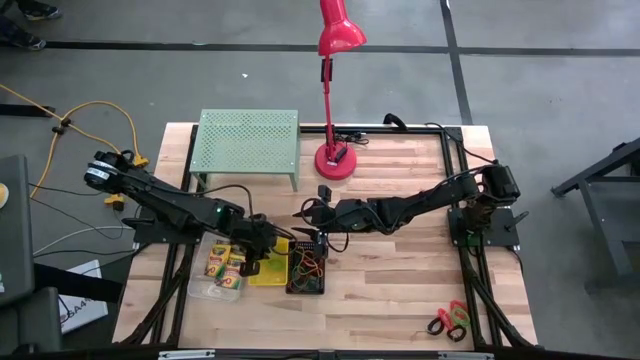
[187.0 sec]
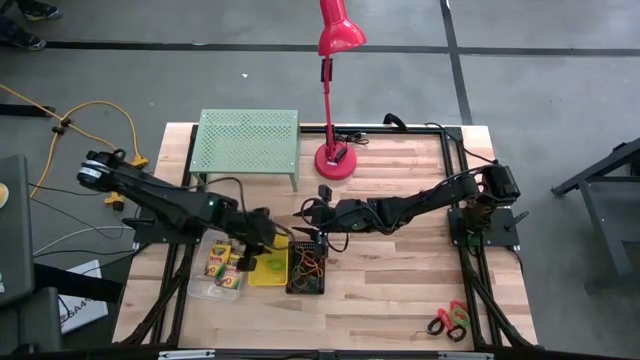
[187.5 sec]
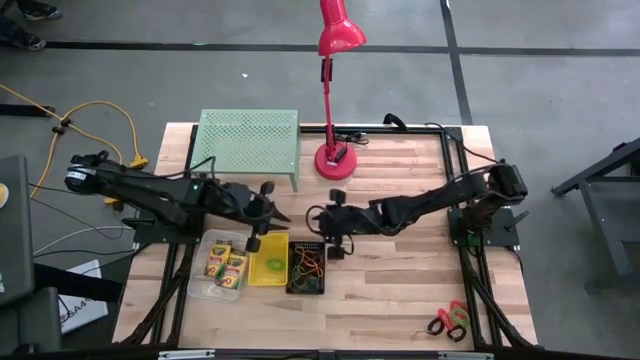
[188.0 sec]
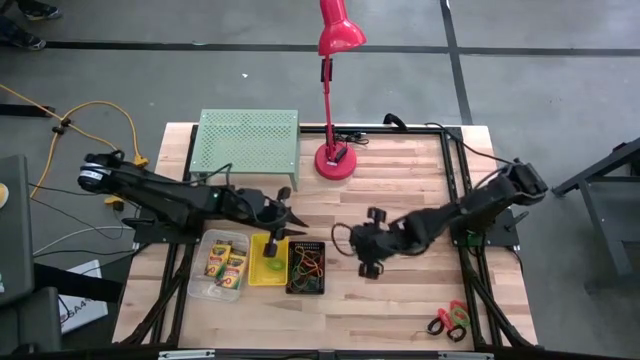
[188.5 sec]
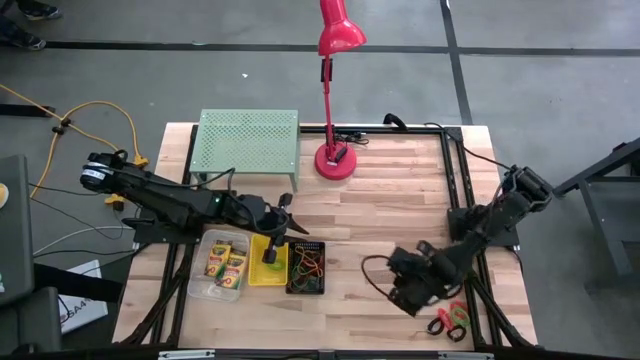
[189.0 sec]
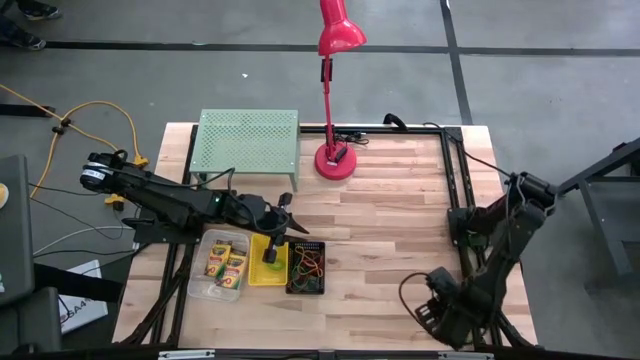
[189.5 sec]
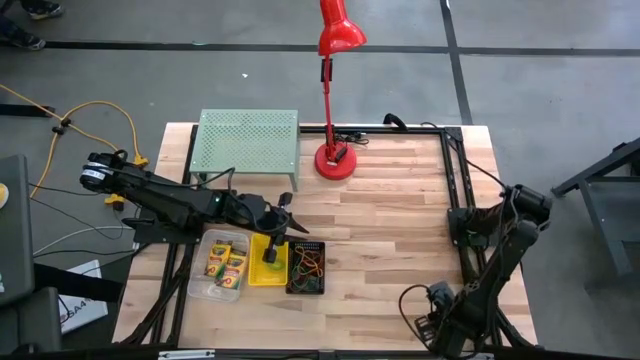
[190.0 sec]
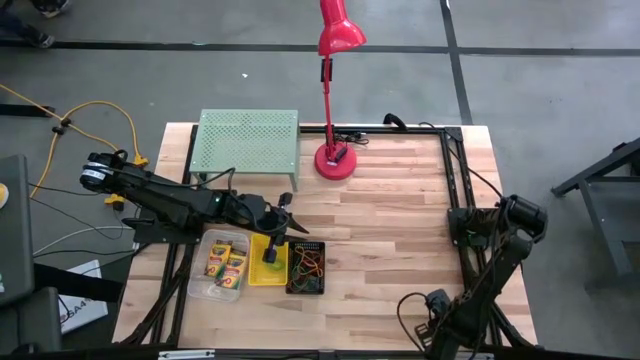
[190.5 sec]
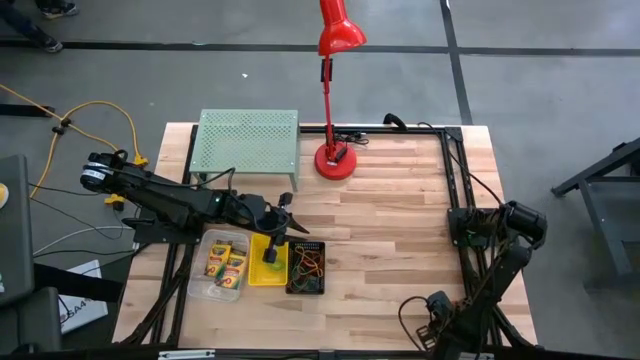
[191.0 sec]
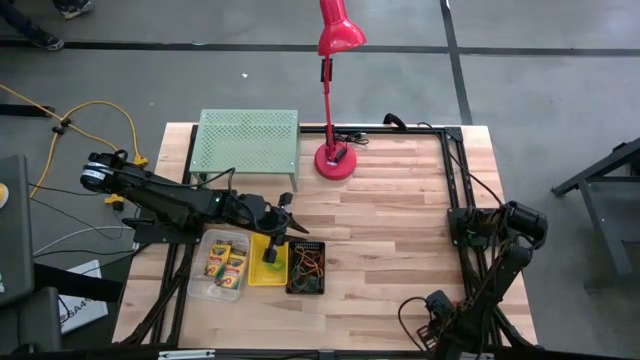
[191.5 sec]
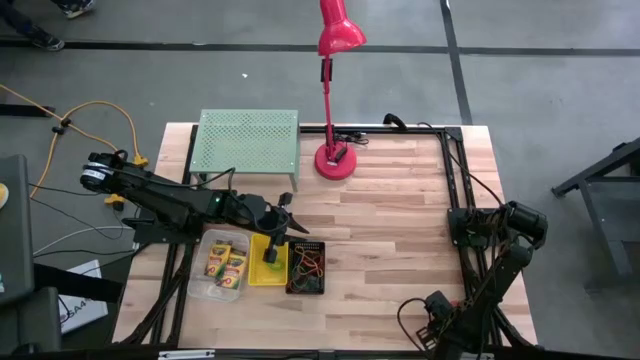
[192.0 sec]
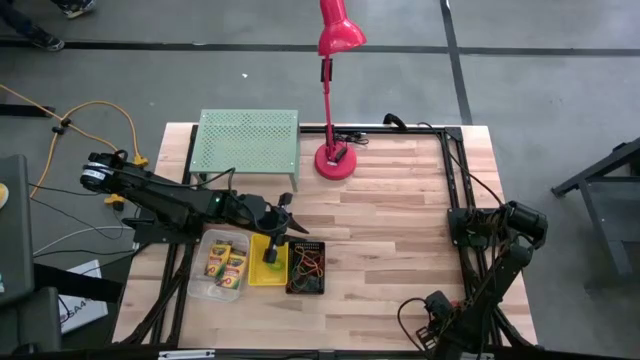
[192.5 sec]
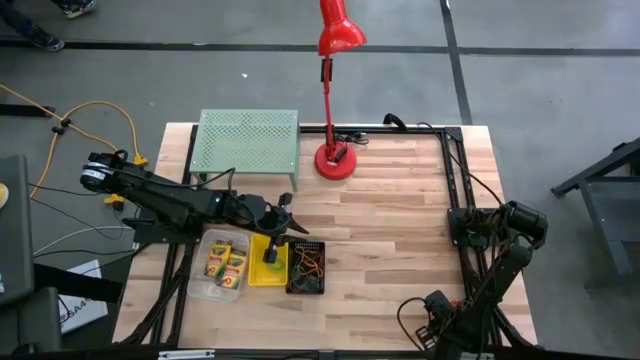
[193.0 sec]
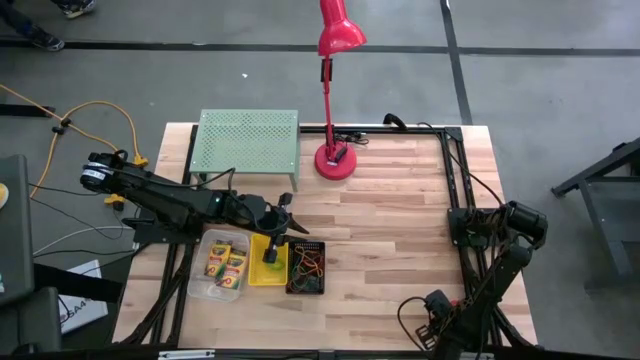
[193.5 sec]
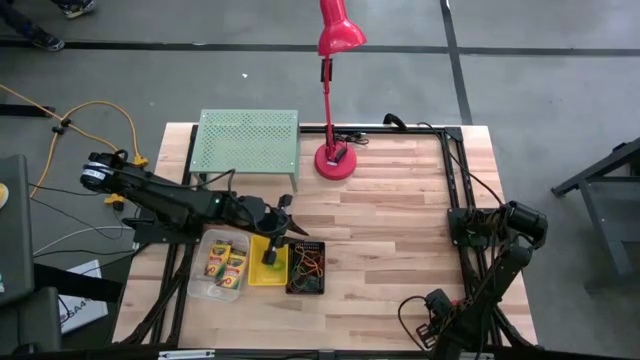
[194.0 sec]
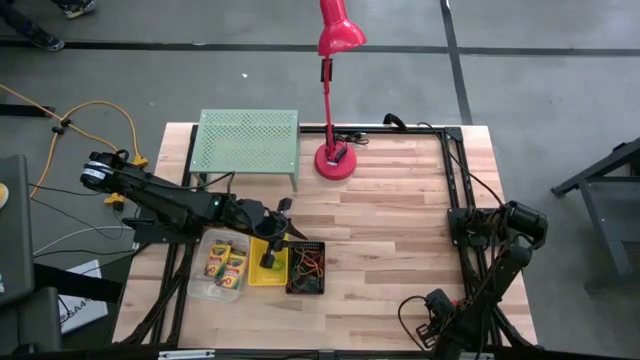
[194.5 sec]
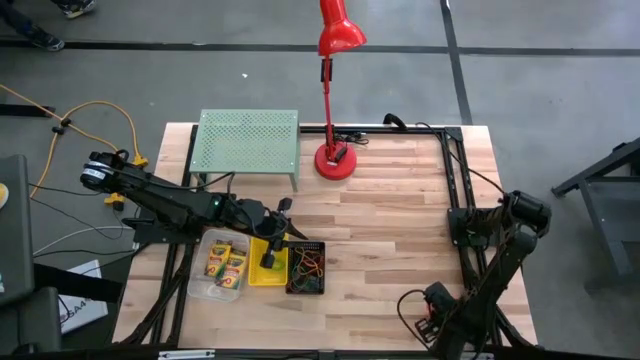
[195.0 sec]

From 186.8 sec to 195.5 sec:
Task: Pick & Place Office Desk Supplies
Put the orange spring keychain into the yellow bin

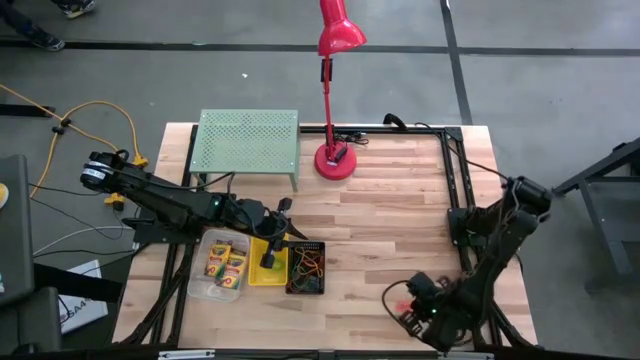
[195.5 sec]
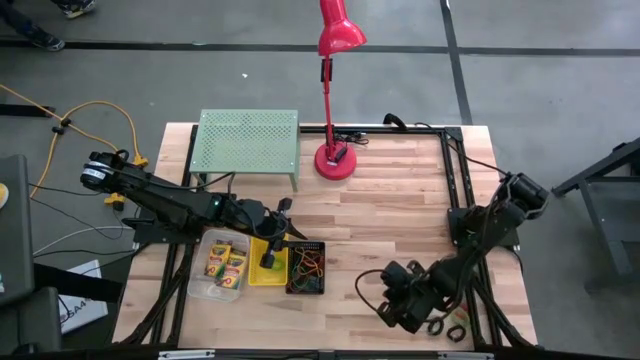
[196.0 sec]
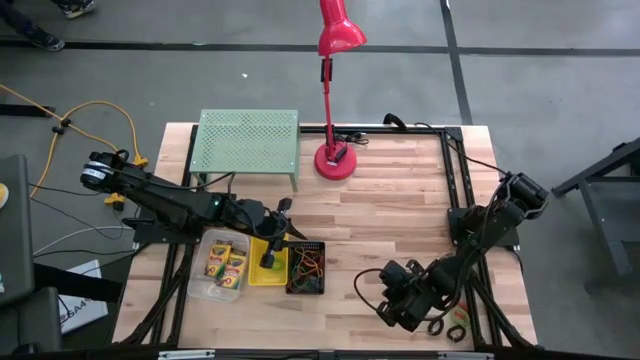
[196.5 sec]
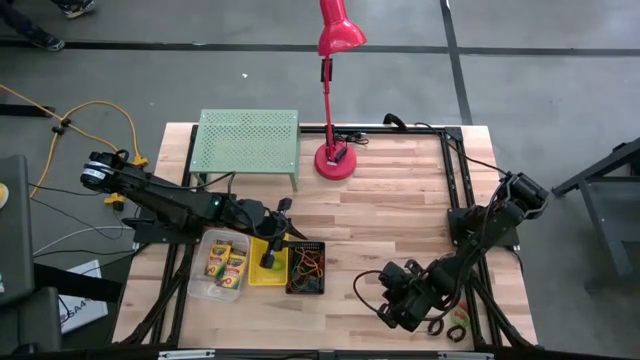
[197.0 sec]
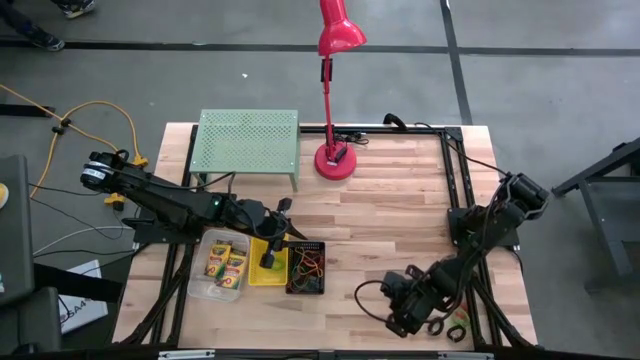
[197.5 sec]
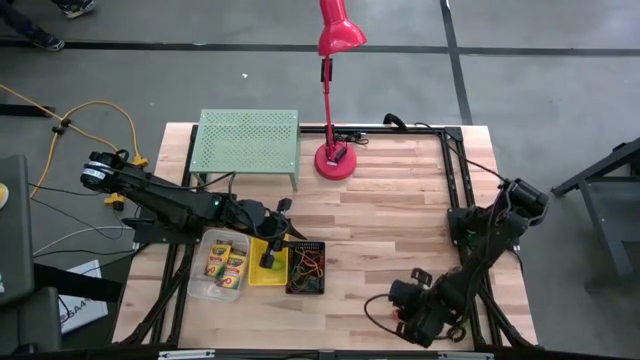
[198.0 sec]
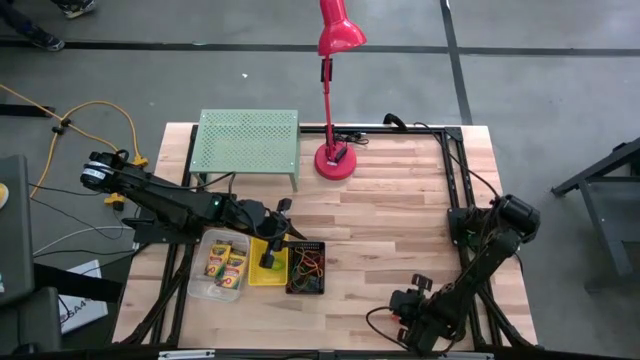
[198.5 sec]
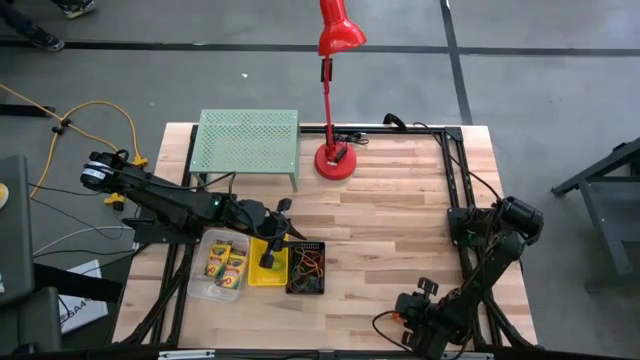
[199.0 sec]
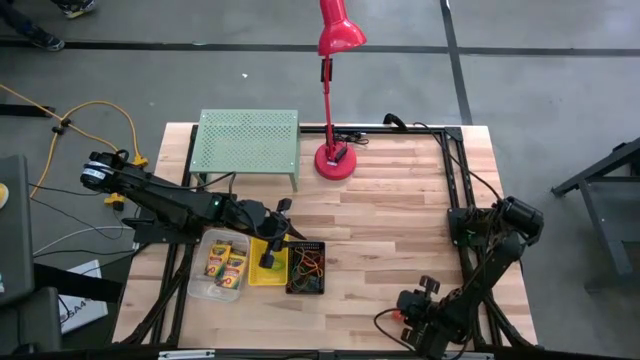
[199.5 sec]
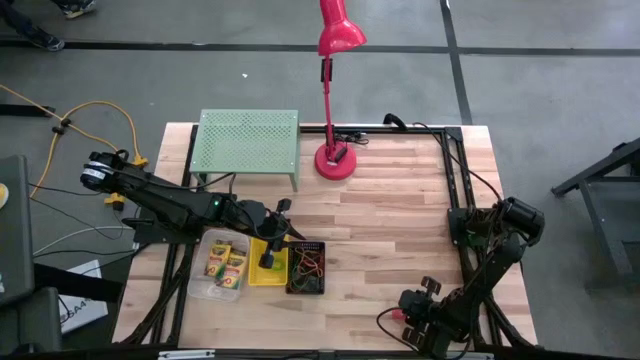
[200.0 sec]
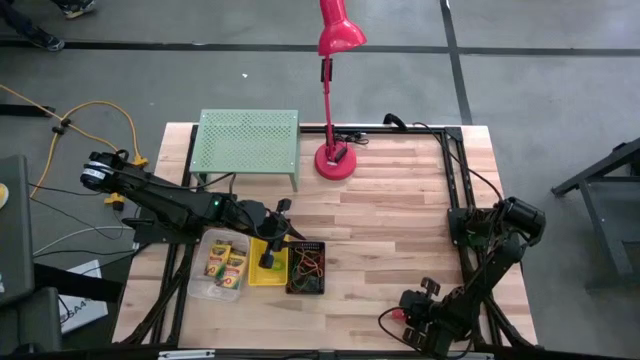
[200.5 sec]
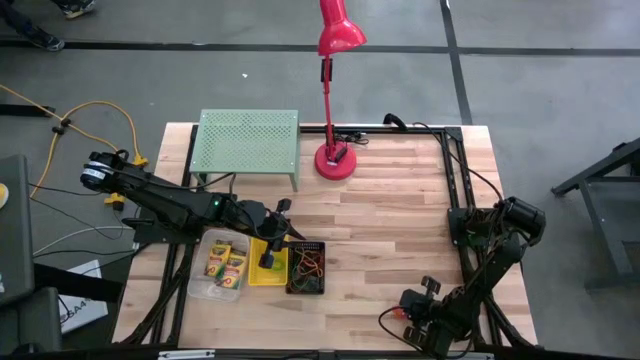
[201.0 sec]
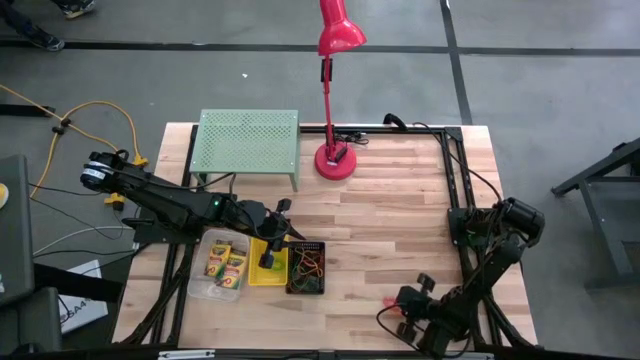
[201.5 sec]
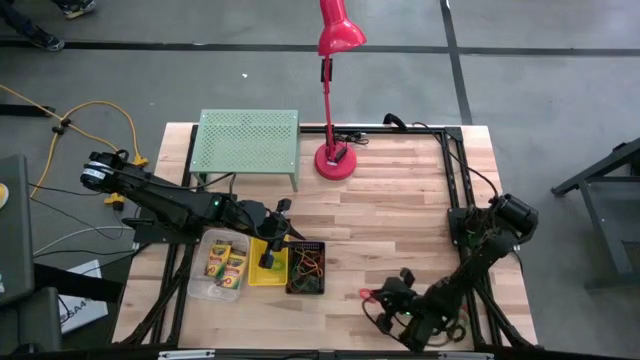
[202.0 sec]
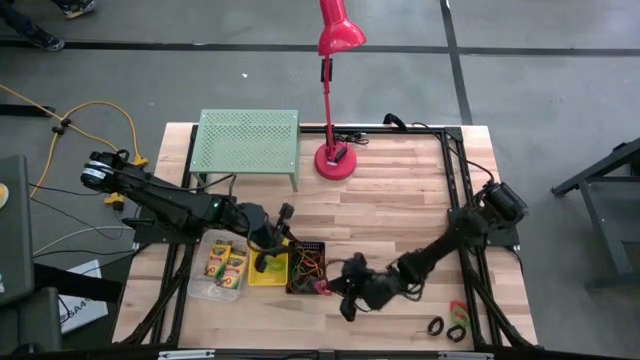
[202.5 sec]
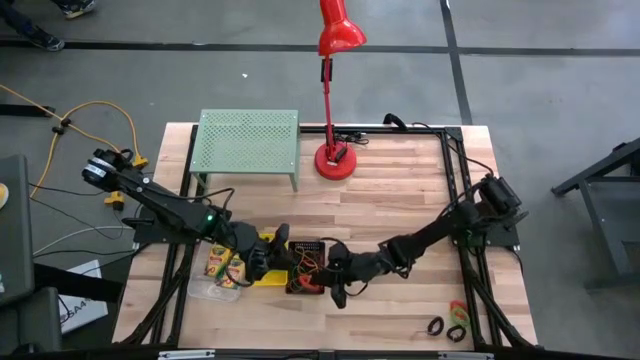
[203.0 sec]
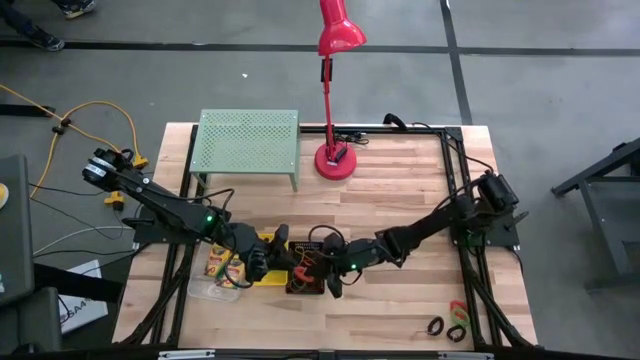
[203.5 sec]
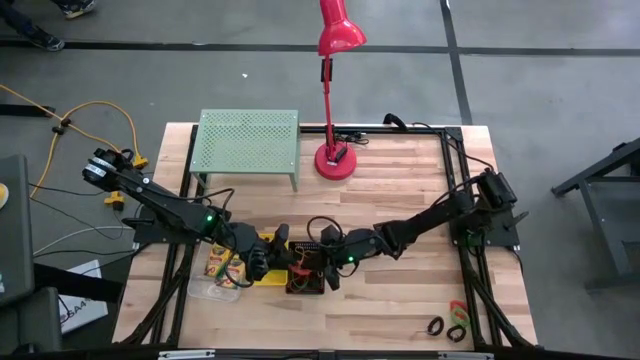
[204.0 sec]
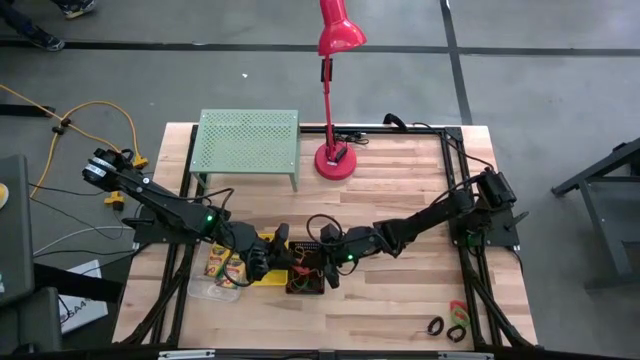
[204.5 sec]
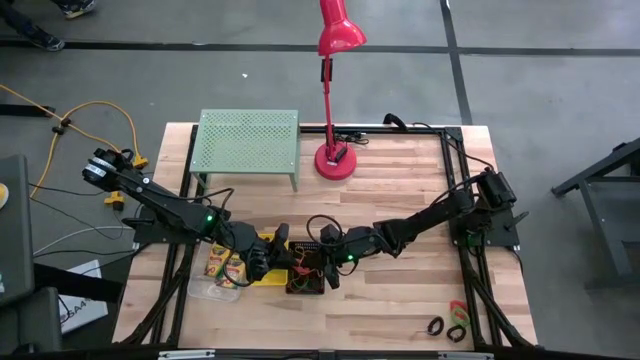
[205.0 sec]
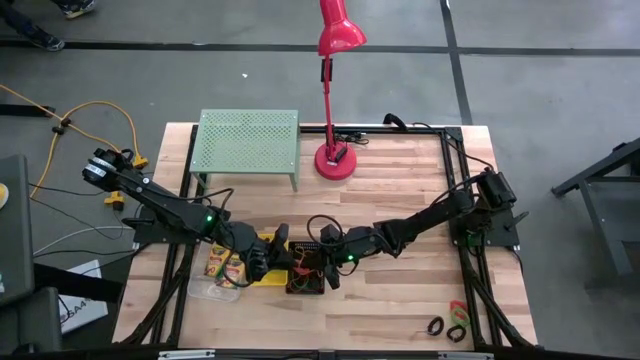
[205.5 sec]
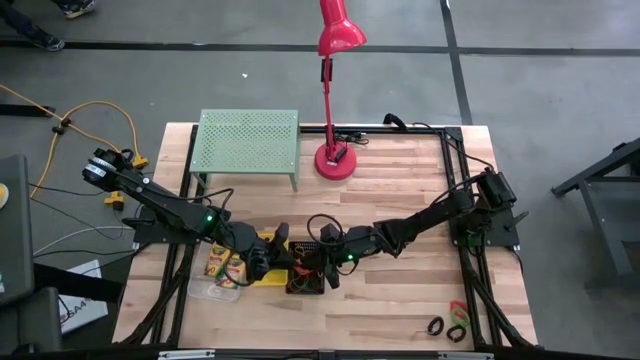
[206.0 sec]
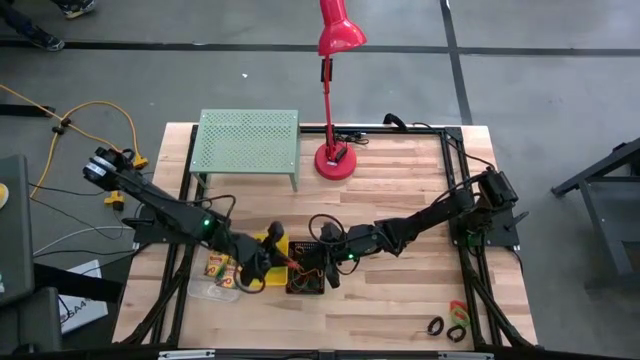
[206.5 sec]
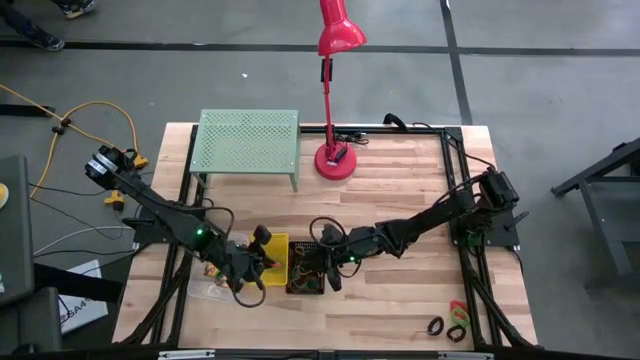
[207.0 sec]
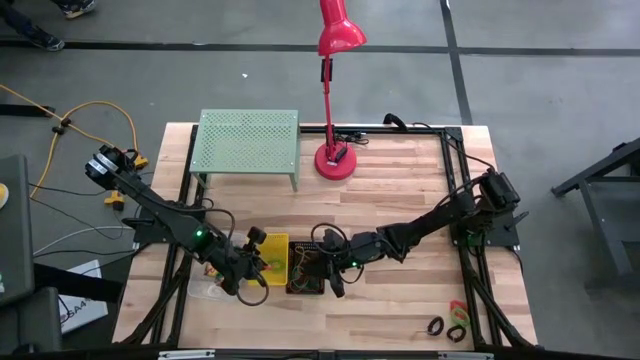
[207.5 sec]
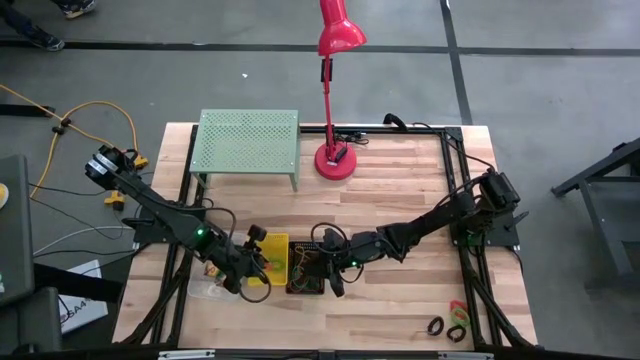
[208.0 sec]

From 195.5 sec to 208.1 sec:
Put the orange spring keychain into the yellow bin
